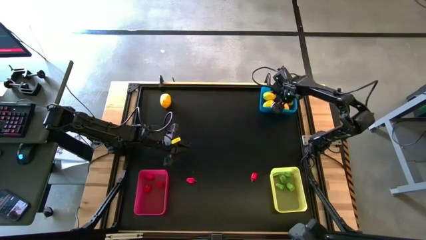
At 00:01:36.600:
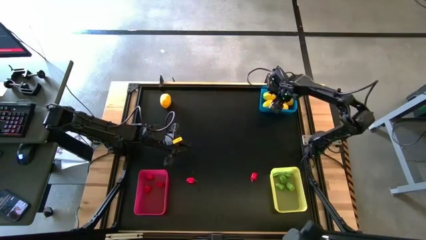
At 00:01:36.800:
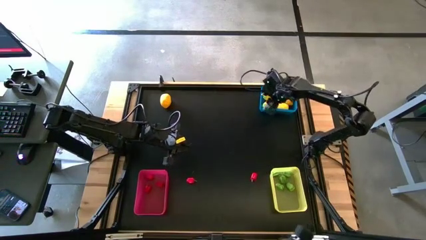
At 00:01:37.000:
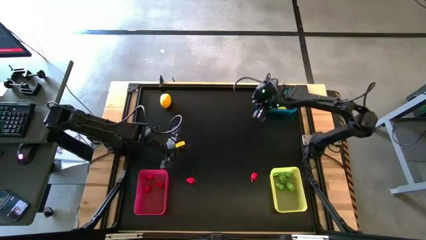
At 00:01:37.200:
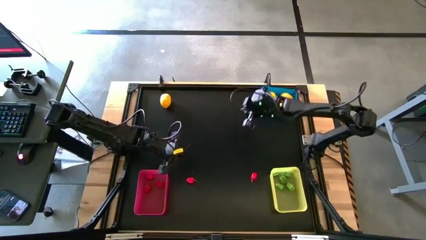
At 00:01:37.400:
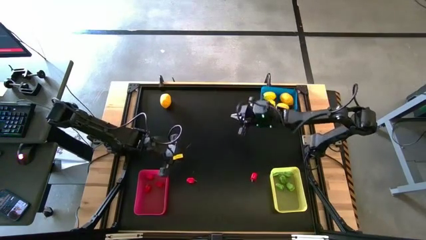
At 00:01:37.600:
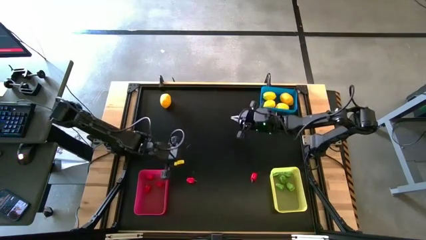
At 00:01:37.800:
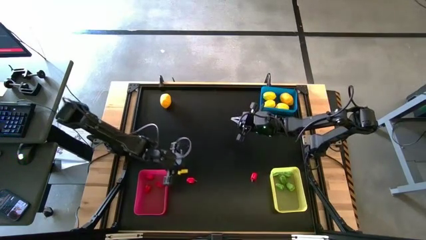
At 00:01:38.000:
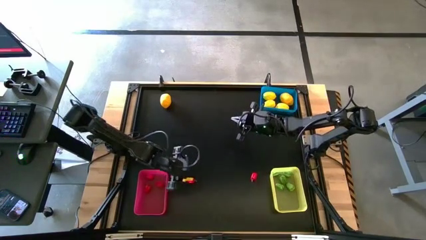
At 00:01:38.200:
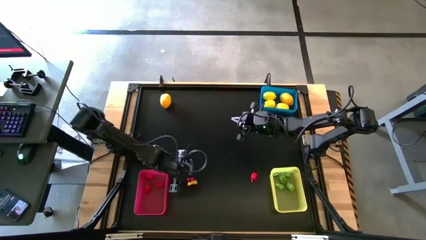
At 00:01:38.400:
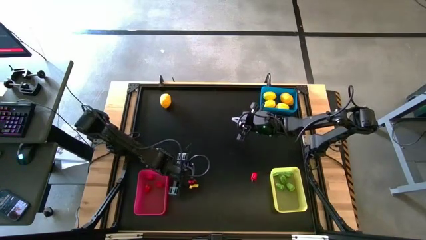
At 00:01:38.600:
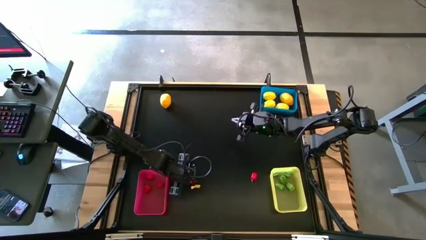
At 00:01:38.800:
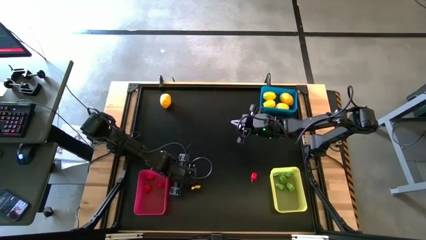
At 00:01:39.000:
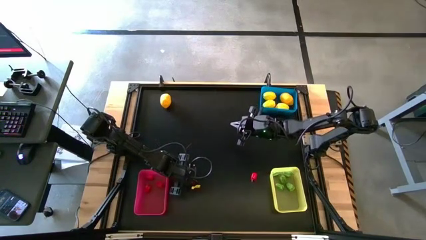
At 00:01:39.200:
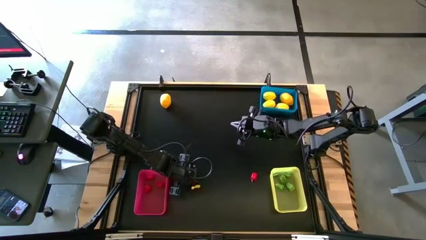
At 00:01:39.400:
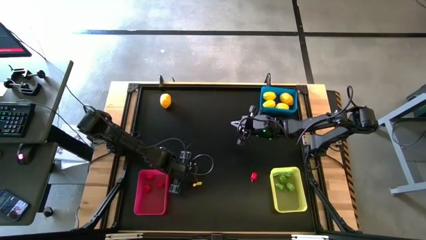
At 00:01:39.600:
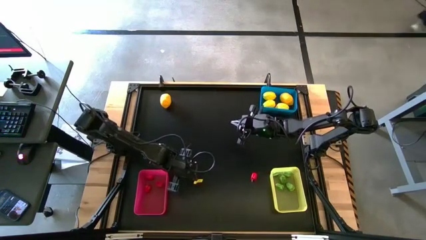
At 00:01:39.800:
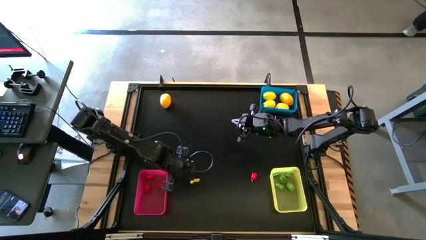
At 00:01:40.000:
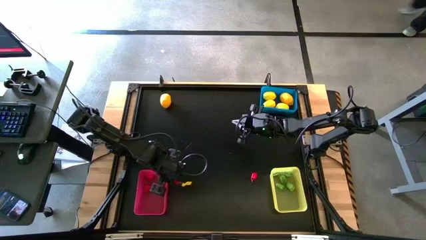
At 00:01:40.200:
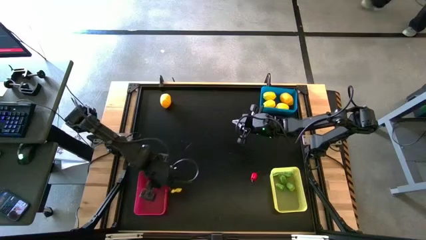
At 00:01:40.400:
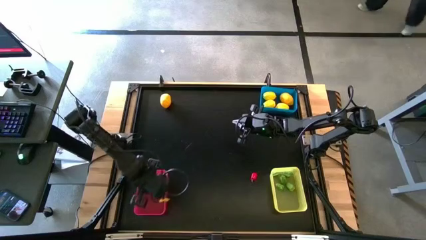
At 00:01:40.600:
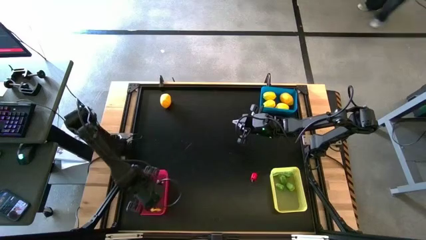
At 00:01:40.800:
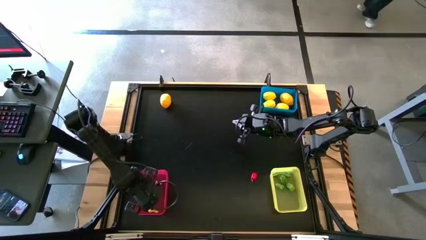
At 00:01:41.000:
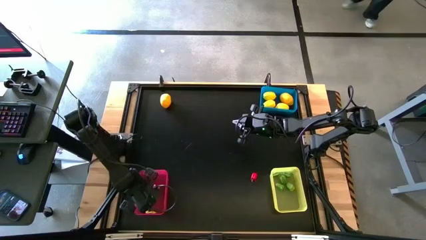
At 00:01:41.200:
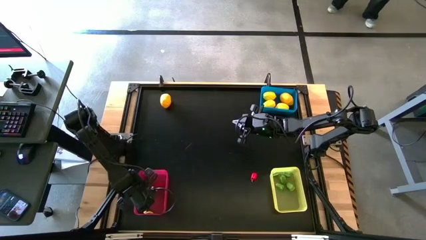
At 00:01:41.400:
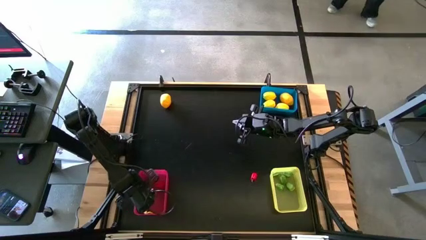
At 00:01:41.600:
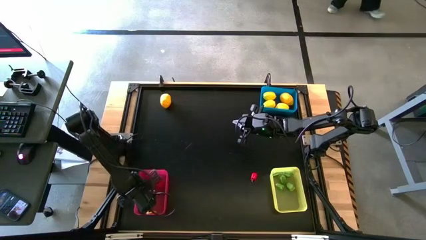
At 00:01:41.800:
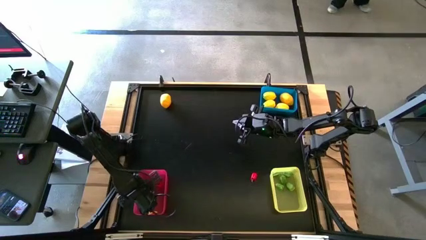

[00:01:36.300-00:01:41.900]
Task: Sort produce into baskets
Put the red chili pepper into the red bin

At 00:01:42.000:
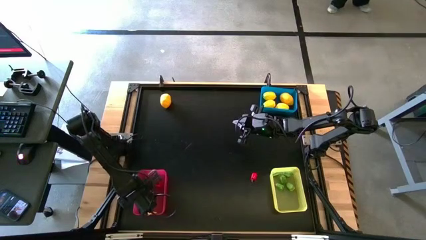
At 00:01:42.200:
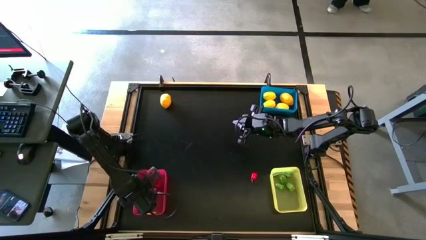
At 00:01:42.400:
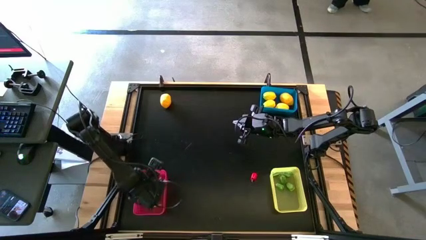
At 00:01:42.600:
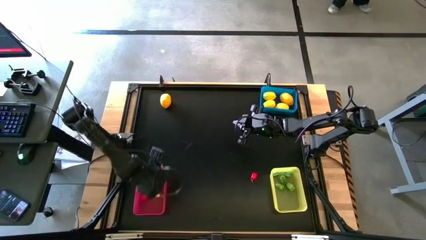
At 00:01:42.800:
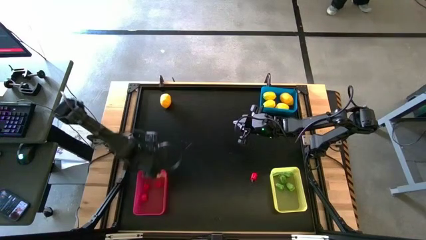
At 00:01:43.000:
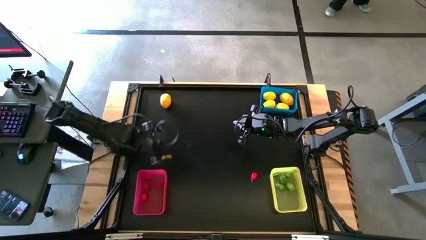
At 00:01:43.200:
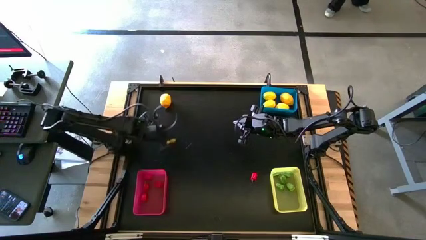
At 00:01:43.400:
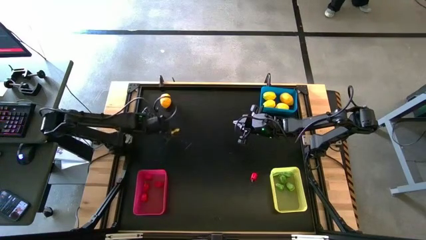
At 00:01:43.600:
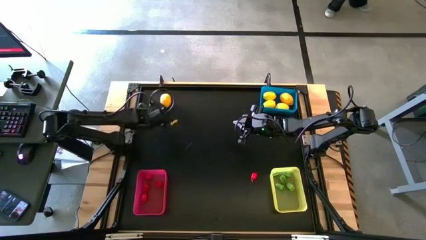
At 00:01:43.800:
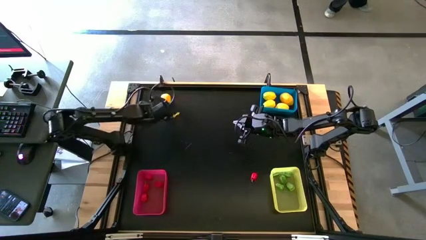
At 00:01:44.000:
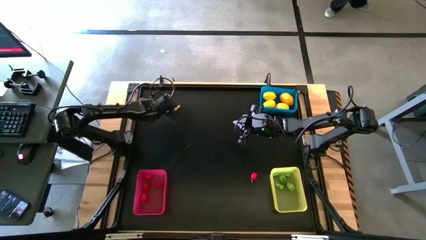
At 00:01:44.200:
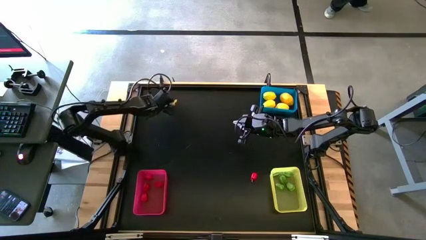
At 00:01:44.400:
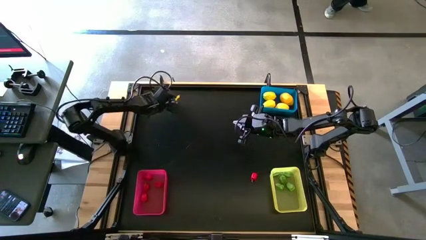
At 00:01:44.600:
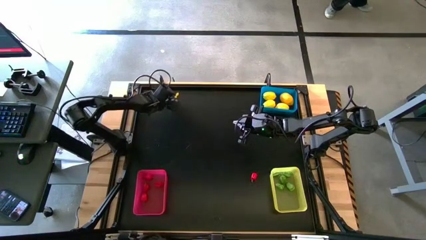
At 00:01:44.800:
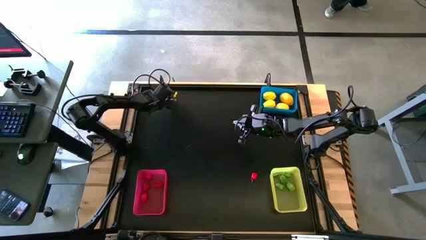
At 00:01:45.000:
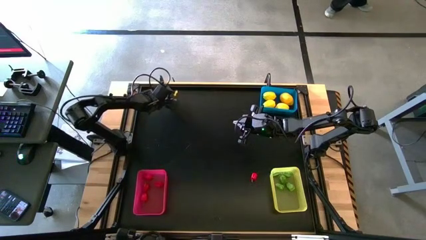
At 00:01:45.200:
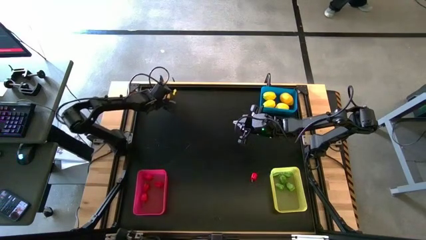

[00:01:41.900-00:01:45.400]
Put the yellow lemon into the blue bin

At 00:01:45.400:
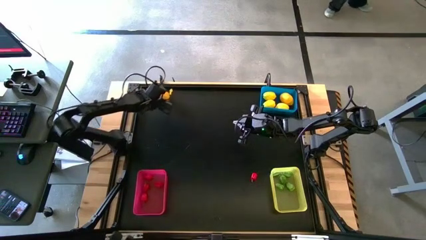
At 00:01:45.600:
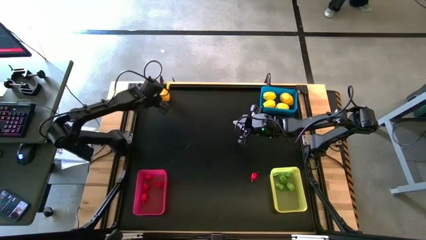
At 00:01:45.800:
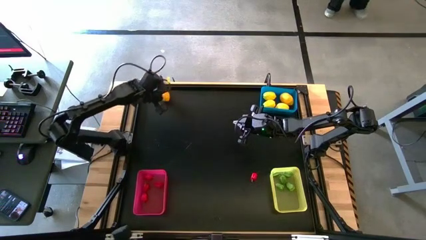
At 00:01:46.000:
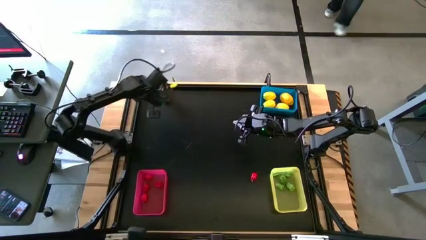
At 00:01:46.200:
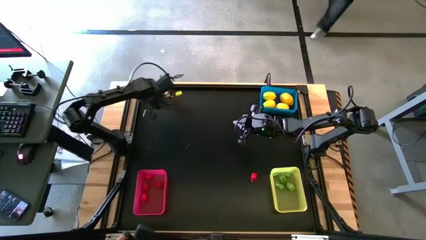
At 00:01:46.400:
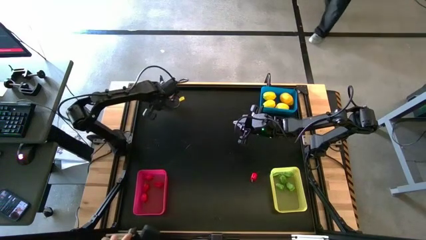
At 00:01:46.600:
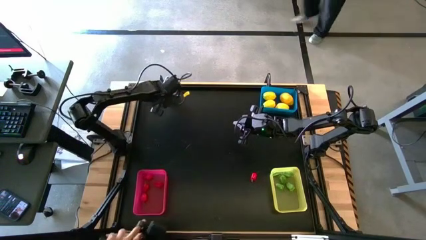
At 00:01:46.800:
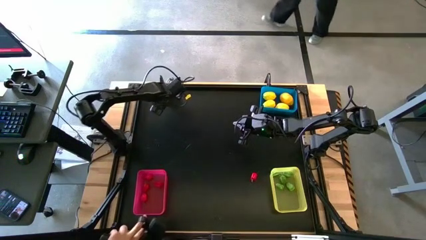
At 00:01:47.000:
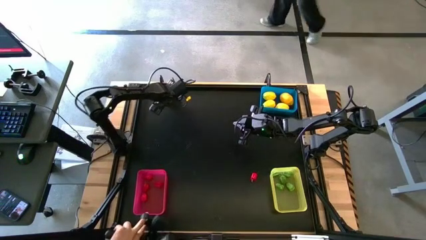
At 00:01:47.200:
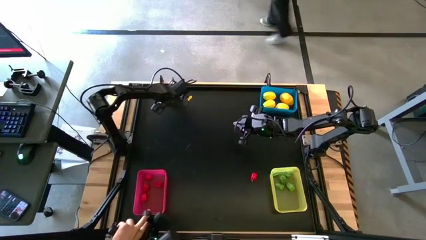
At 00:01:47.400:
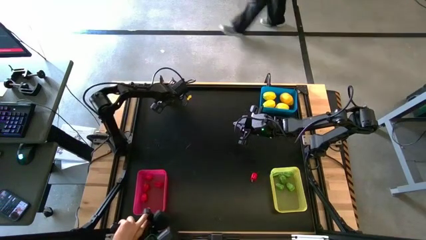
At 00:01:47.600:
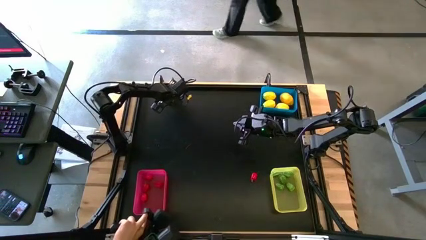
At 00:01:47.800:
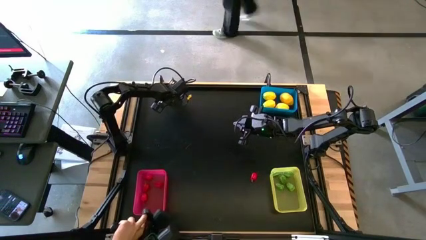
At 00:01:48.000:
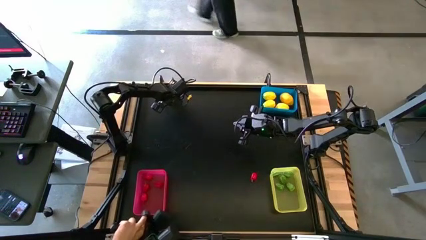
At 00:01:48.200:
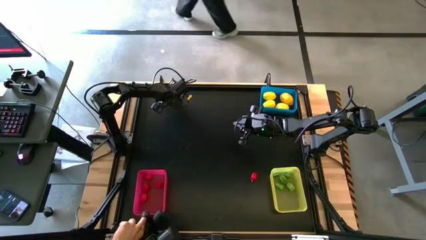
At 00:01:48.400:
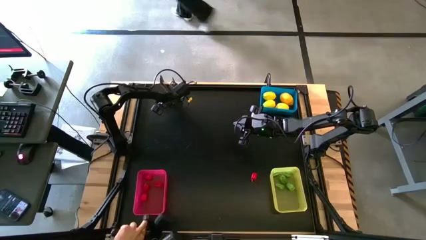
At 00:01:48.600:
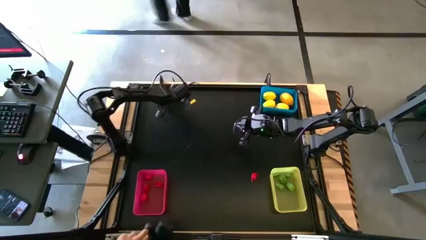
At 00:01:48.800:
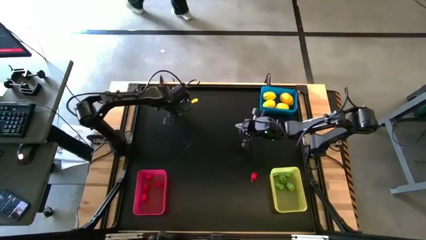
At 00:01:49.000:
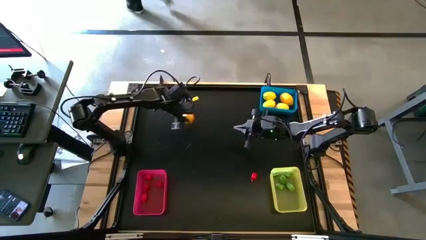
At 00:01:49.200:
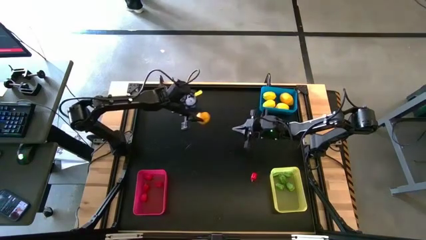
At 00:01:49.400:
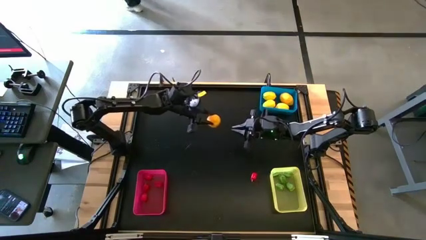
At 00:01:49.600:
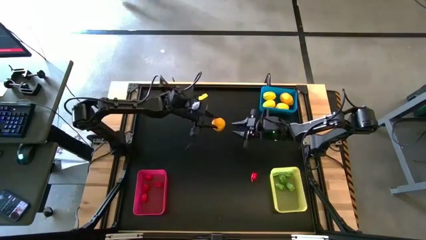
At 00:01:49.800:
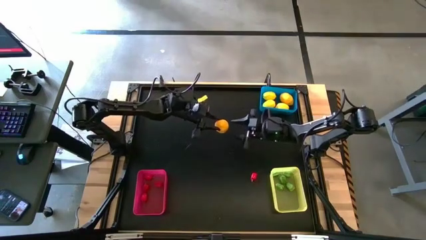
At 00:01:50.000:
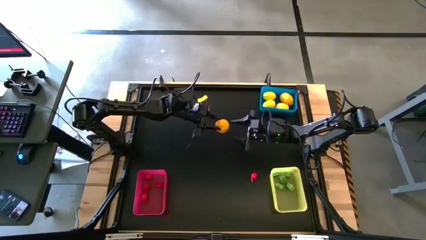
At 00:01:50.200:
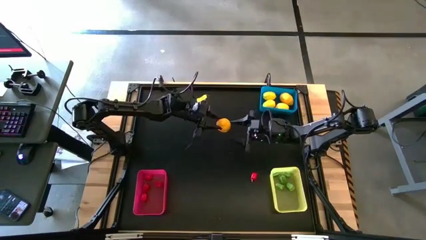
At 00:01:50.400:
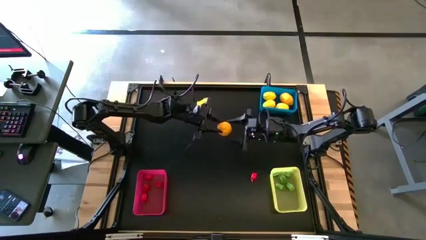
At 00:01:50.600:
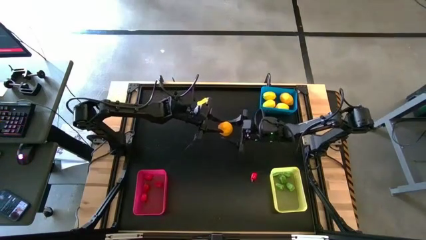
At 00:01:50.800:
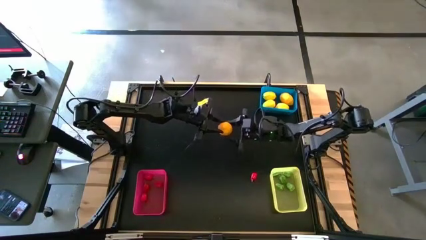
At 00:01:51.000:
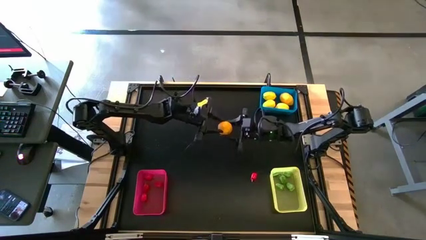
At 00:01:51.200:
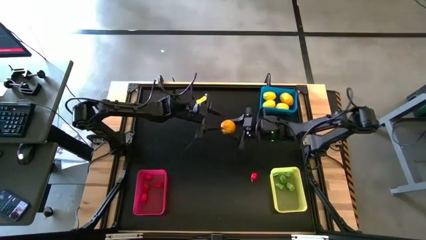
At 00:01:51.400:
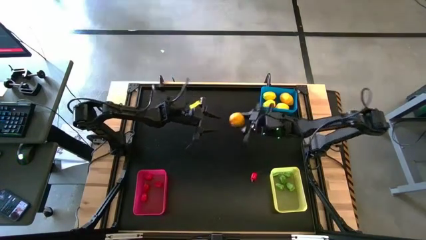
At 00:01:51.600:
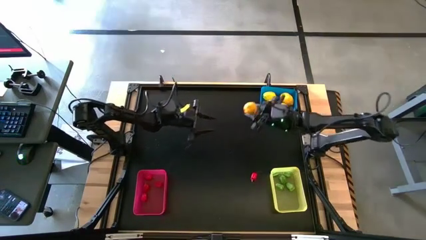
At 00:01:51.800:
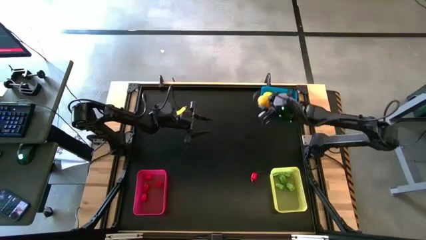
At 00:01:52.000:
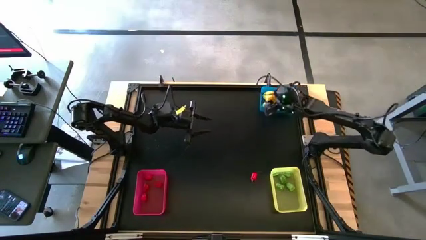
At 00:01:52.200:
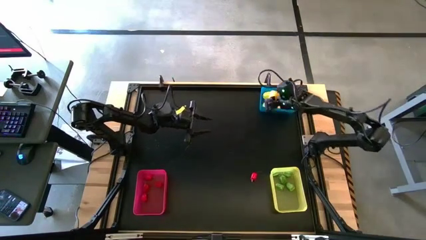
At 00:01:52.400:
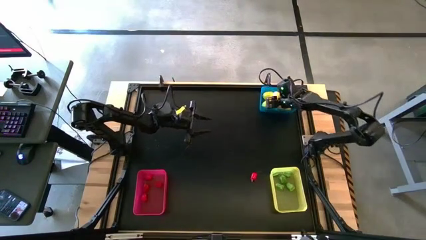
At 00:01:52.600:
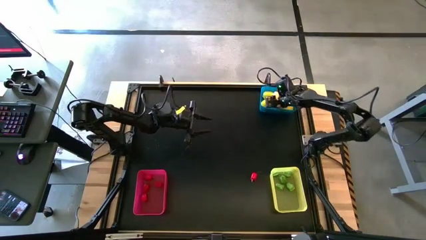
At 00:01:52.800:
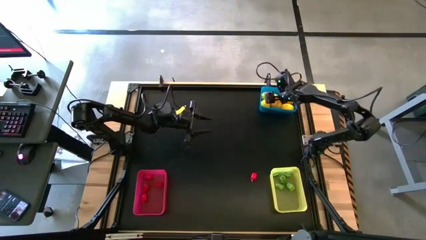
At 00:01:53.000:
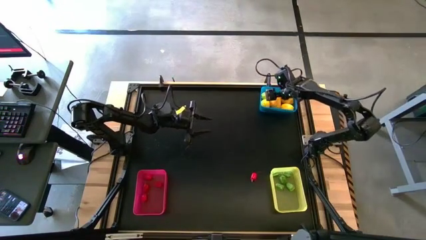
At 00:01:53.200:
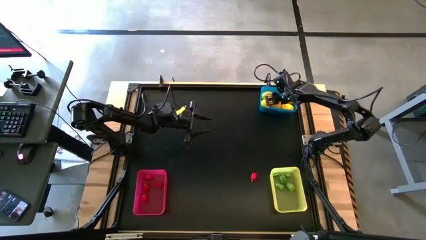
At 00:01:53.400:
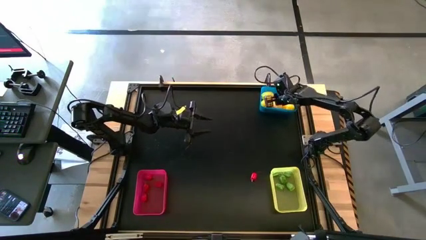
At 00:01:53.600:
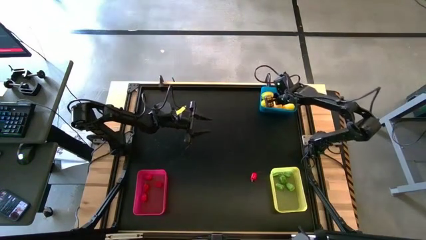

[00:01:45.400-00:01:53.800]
Put the yellow lemon into the blue bin
